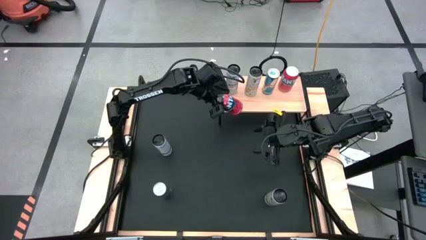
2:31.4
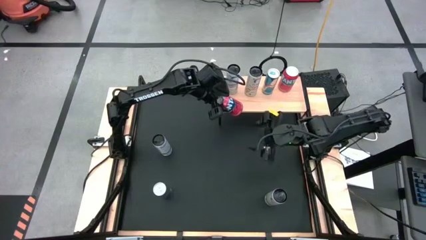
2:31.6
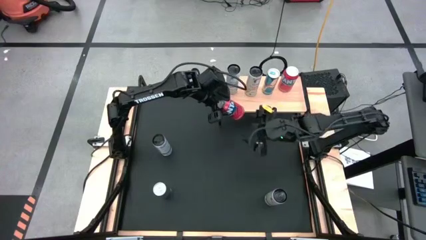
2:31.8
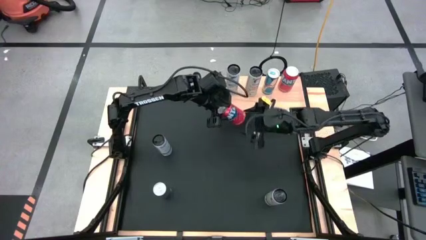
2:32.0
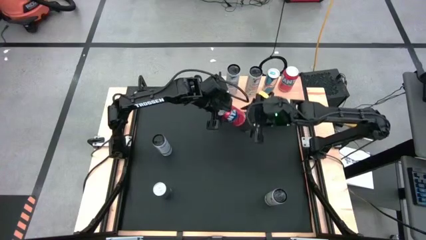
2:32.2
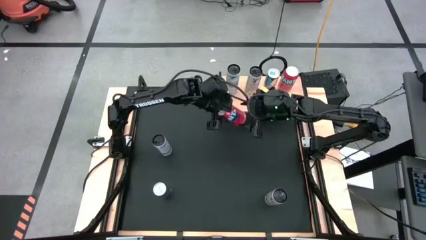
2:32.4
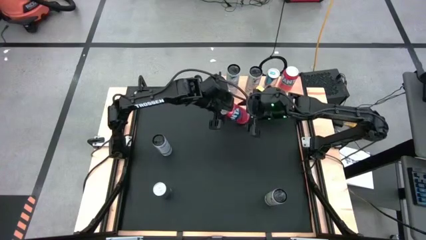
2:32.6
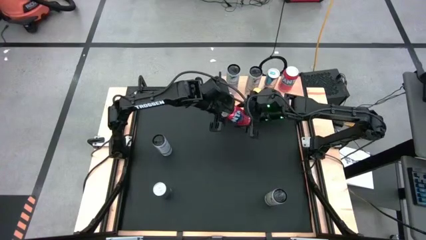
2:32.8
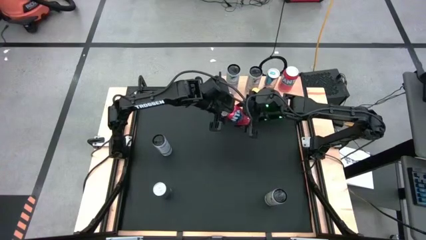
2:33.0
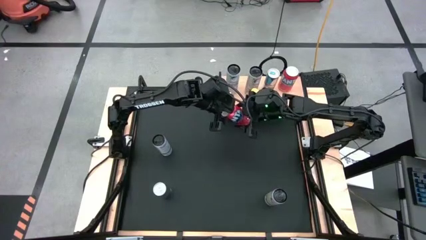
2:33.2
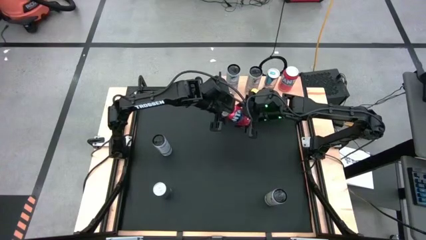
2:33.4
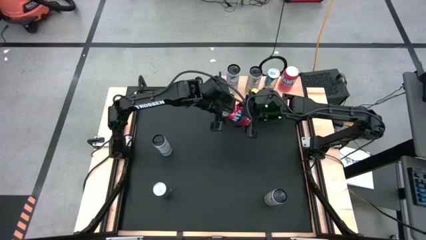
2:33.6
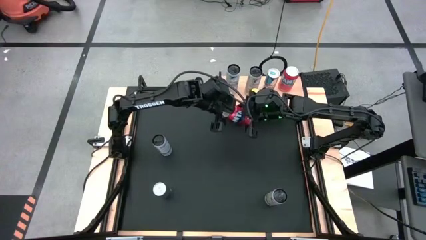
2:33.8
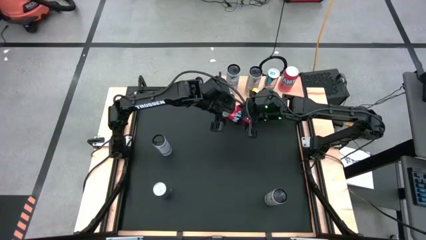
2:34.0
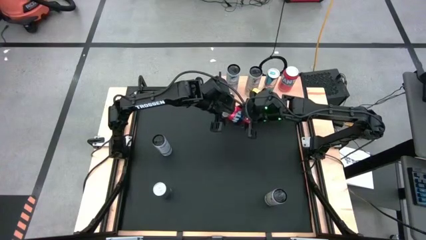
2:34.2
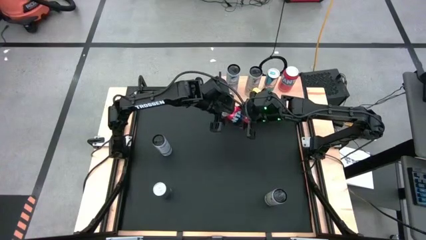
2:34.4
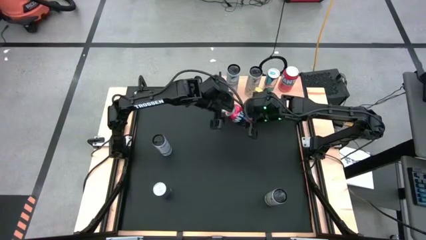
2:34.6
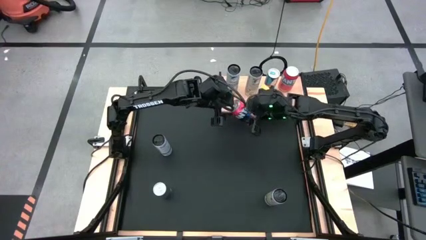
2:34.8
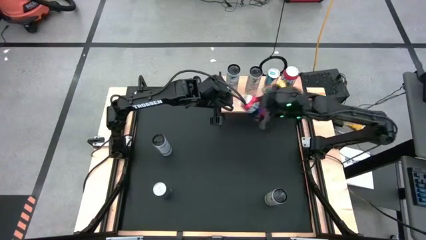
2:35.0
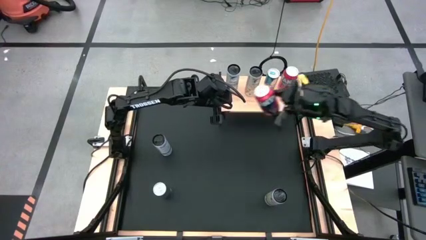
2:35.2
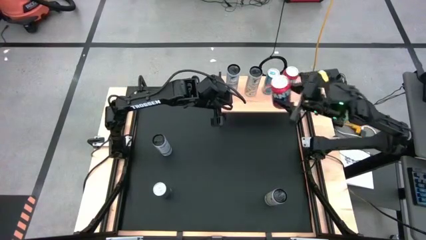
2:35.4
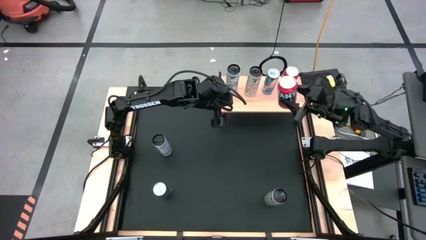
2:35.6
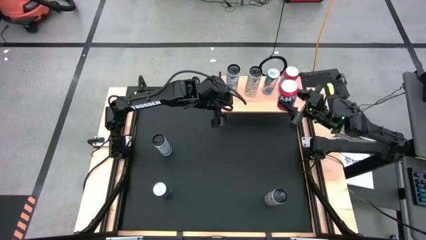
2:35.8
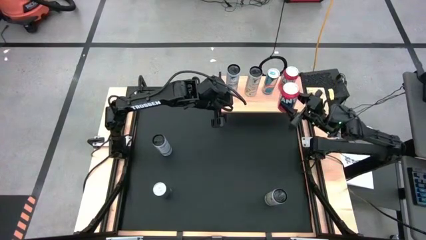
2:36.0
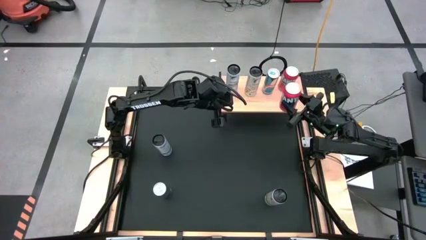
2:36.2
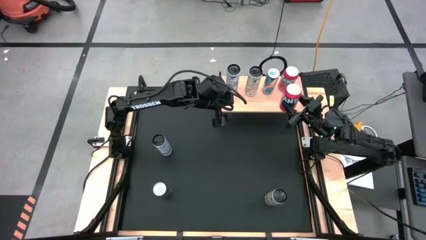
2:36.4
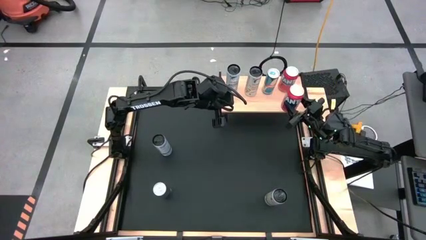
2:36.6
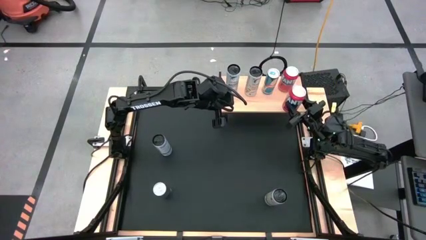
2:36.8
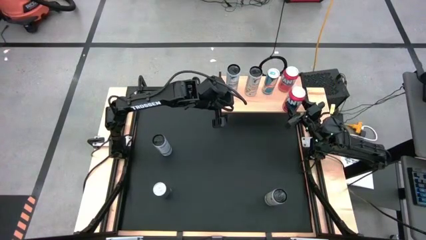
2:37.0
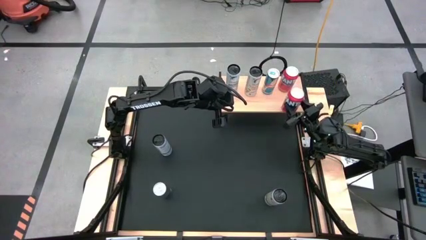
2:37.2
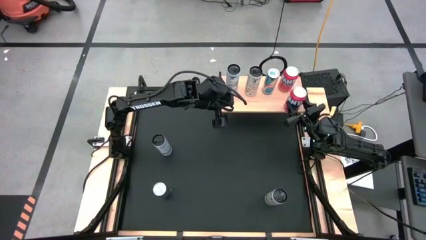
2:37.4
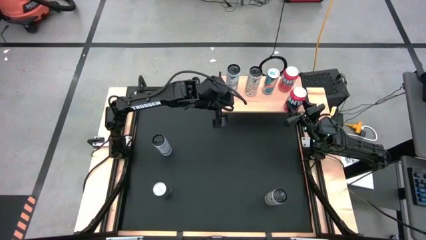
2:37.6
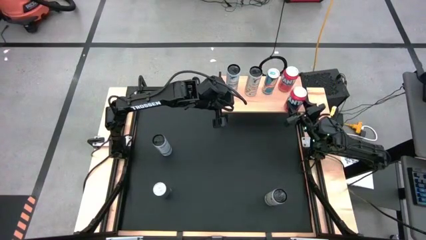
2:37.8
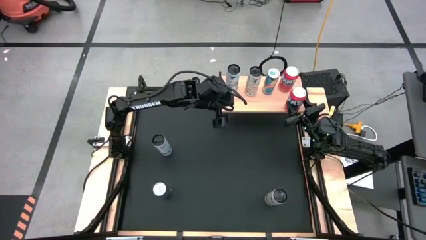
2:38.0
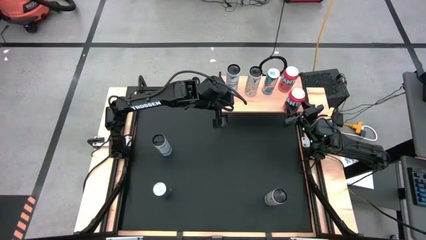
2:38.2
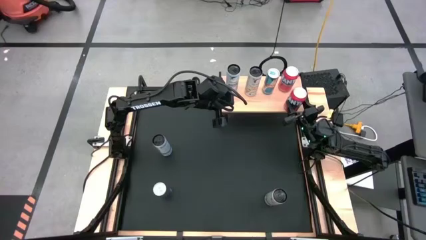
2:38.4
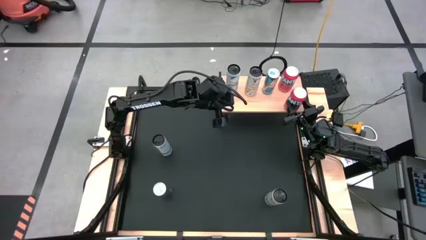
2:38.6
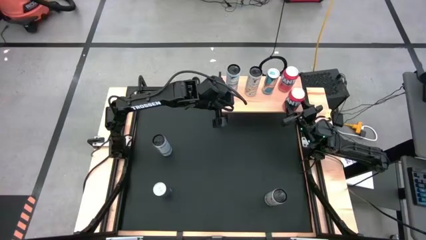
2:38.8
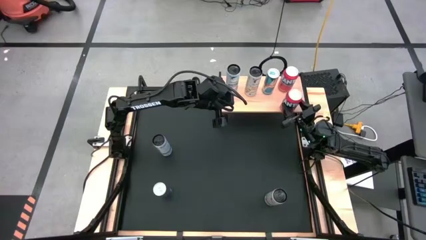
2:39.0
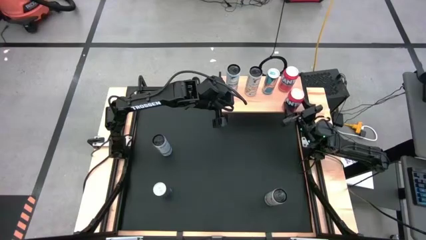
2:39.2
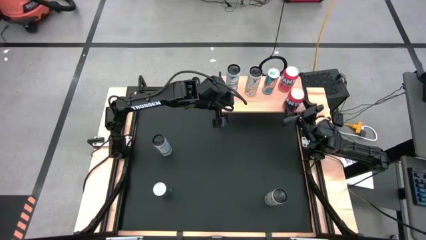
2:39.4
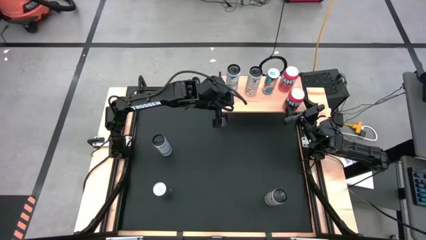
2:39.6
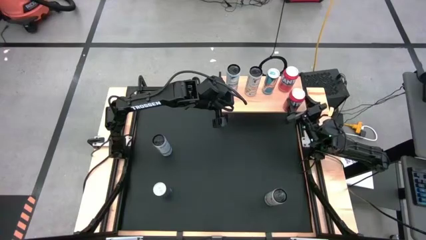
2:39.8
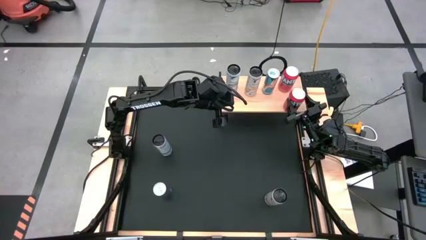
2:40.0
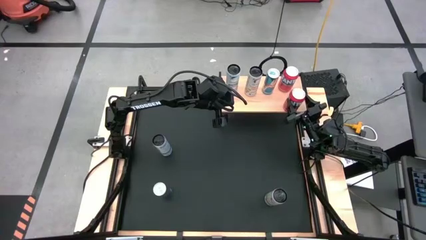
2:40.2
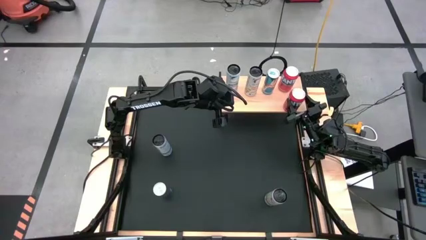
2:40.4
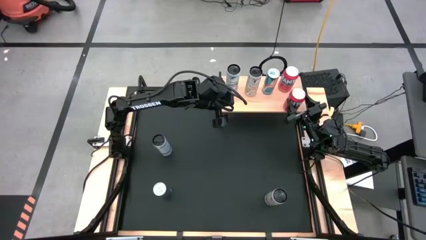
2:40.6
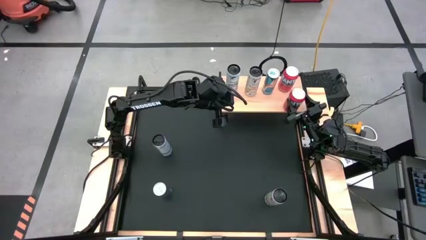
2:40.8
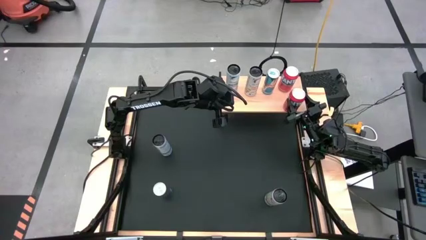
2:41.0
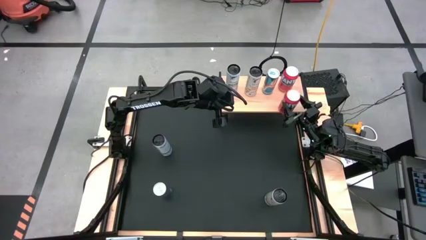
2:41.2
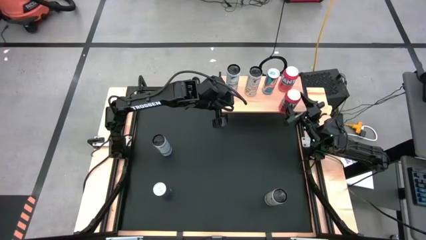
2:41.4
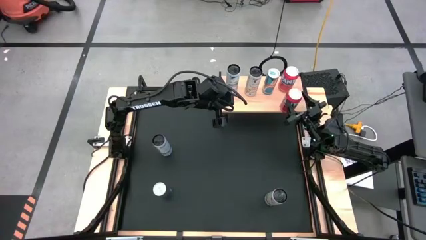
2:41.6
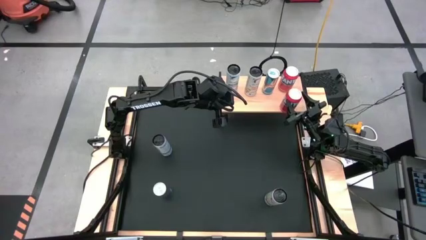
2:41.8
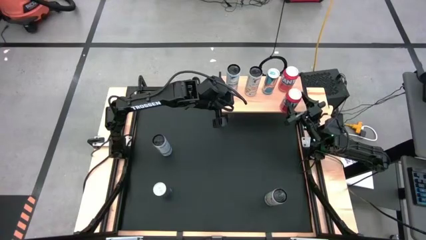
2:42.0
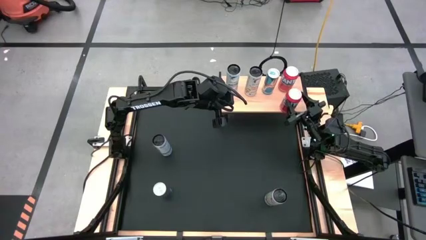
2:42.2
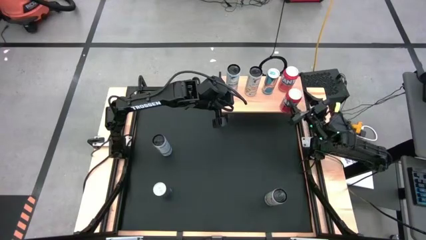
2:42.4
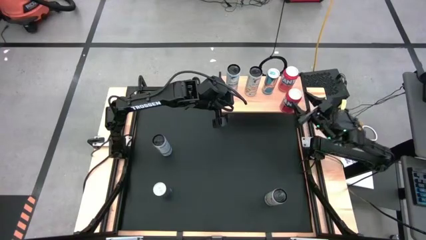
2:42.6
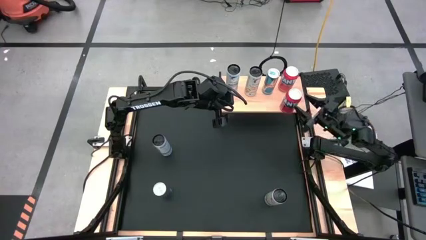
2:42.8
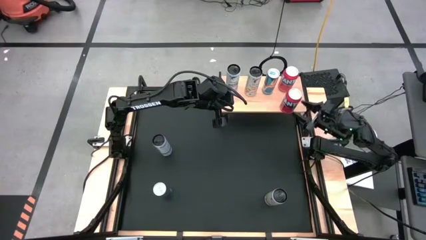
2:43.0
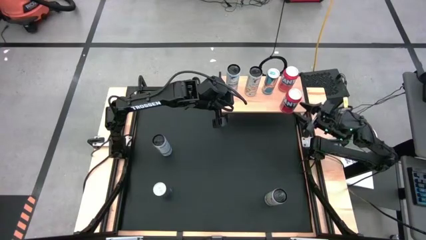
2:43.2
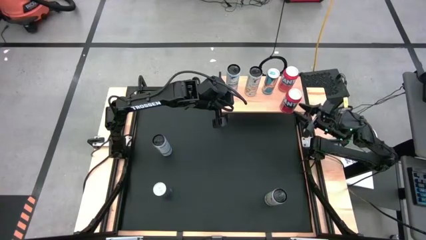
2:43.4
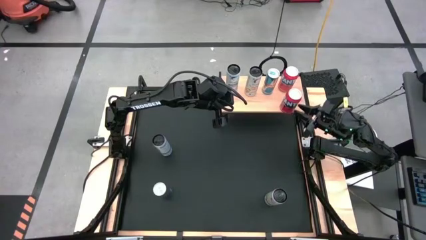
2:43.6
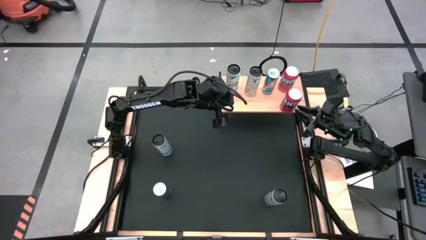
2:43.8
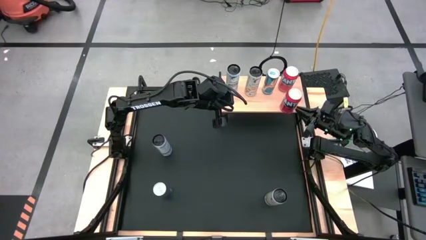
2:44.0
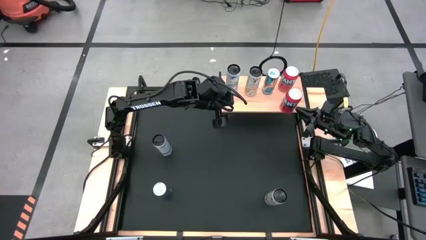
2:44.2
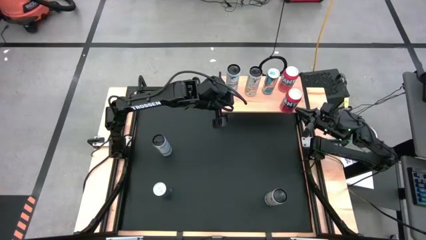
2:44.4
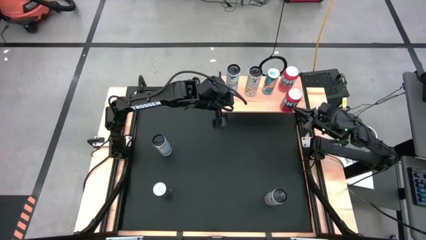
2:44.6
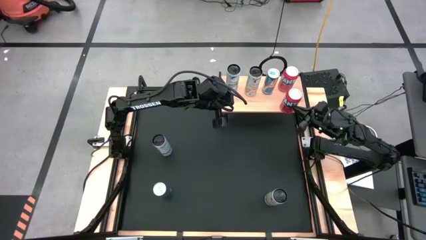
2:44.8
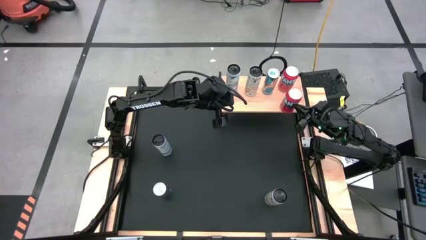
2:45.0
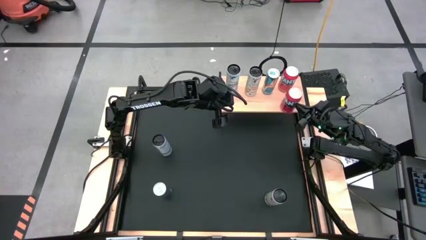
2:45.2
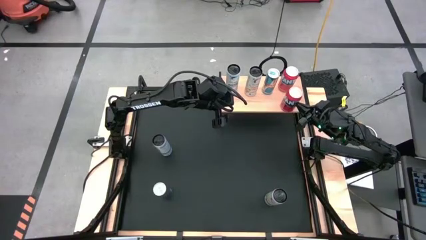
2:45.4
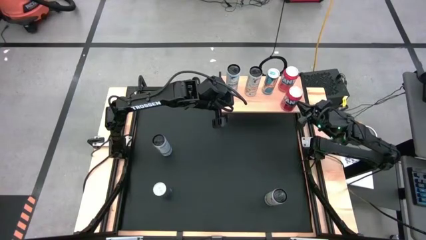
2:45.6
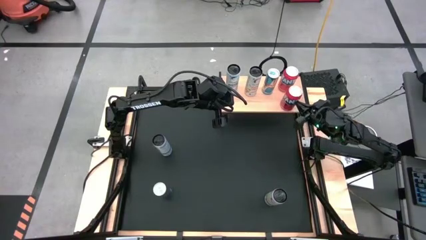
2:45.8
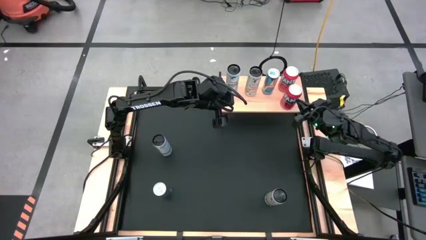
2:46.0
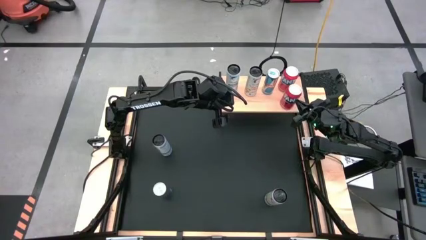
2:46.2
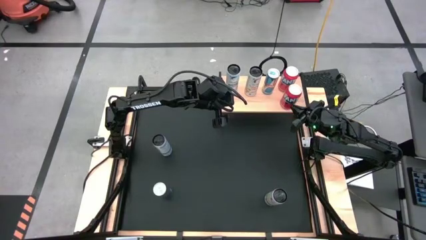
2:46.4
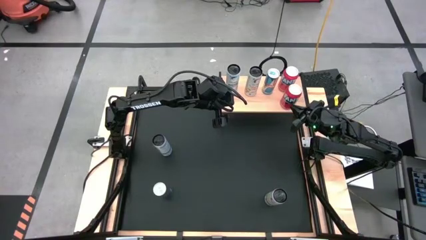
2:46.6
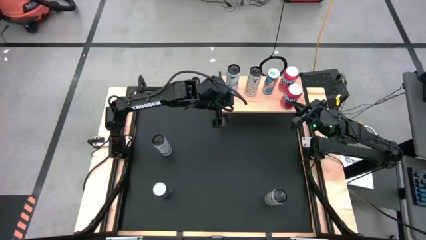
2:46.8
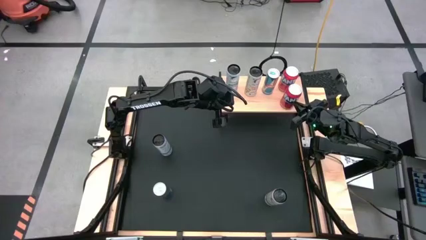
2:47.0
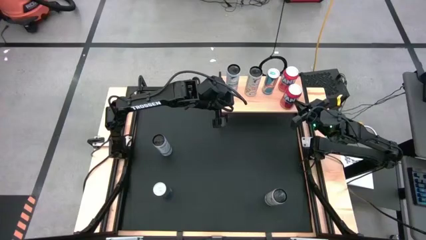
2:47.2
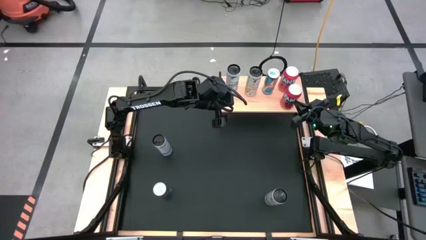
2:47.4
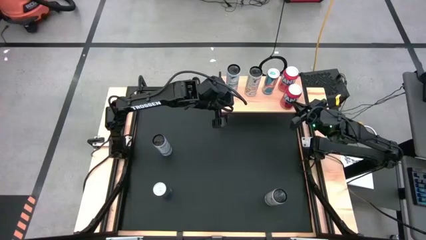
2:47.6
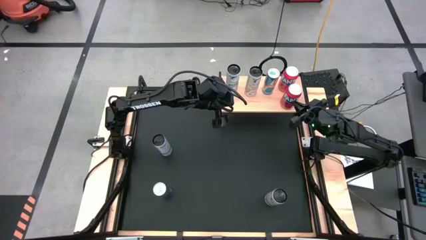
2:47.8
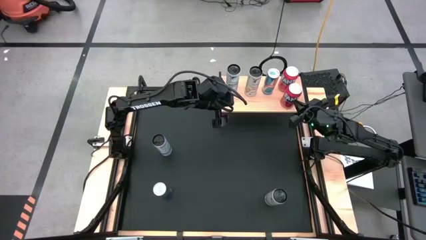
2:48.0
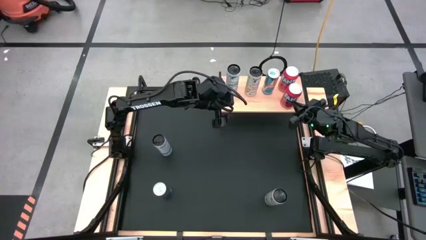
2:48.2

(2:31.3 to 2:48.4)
Task: Place canned beverage on shelf
Put the red soda can on the shelf aligned with the red soda can
